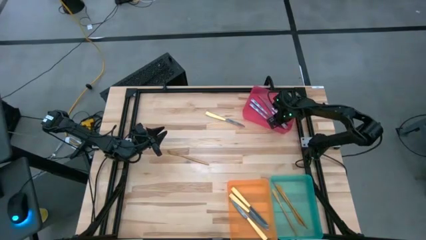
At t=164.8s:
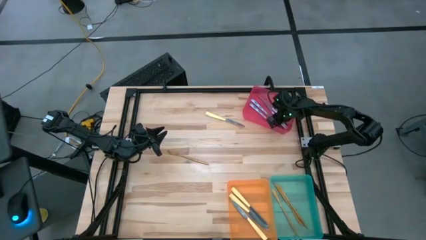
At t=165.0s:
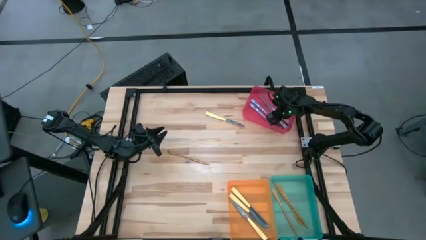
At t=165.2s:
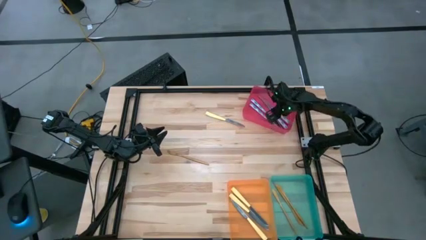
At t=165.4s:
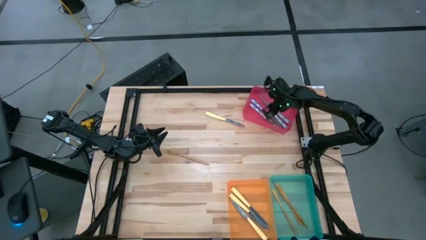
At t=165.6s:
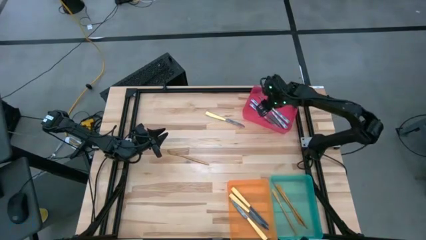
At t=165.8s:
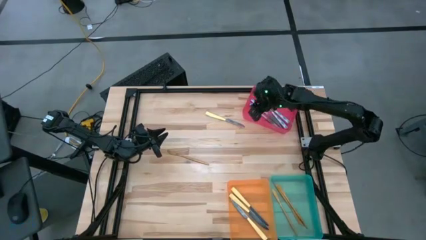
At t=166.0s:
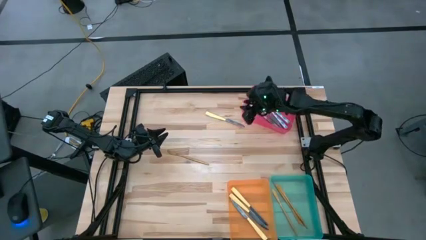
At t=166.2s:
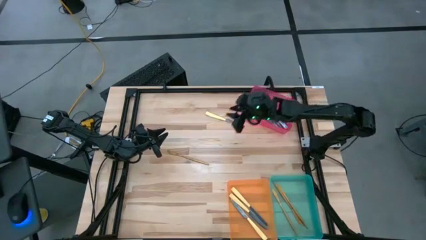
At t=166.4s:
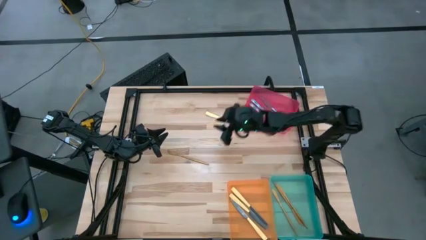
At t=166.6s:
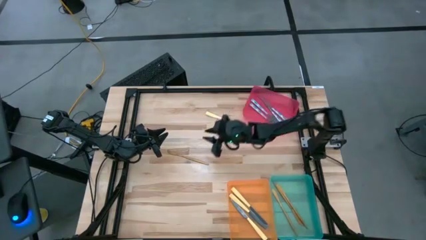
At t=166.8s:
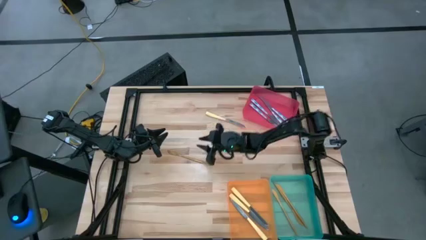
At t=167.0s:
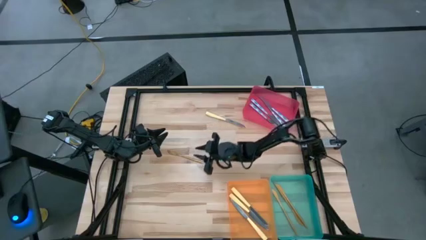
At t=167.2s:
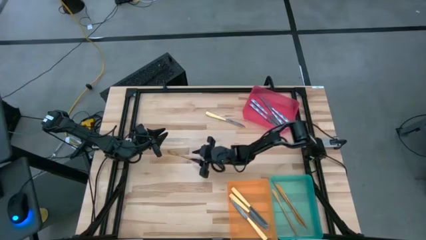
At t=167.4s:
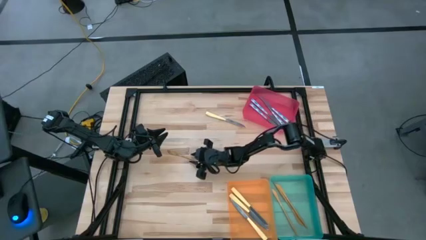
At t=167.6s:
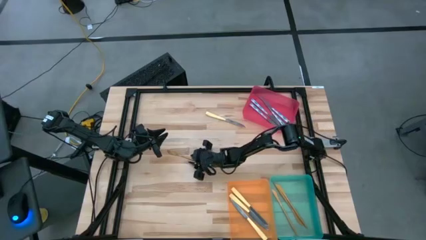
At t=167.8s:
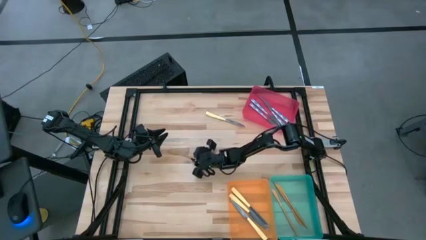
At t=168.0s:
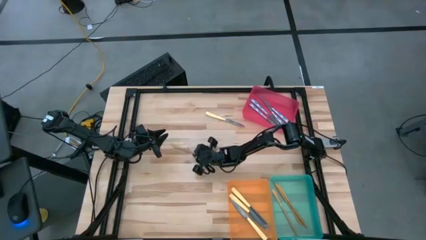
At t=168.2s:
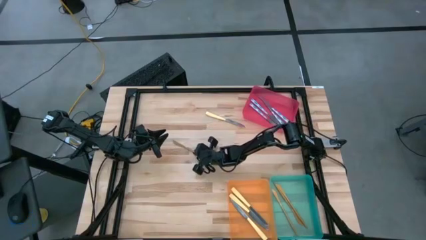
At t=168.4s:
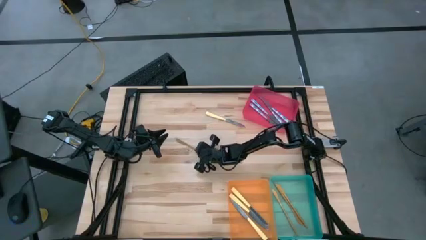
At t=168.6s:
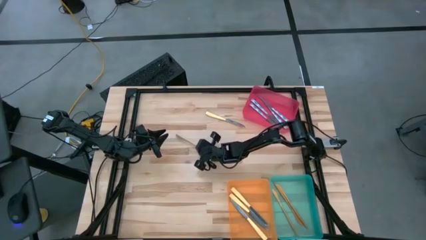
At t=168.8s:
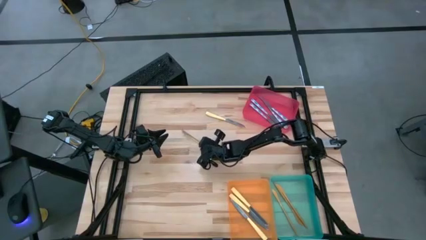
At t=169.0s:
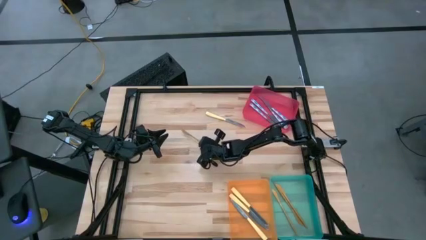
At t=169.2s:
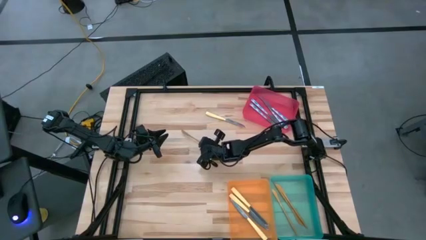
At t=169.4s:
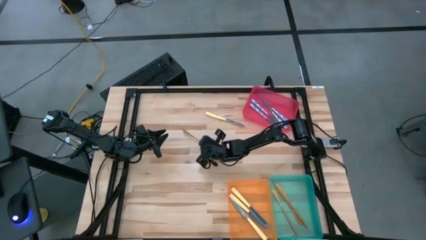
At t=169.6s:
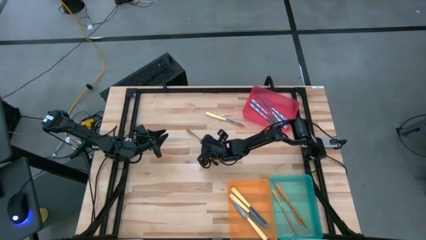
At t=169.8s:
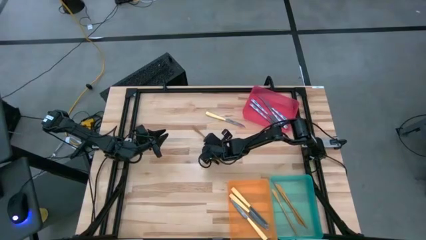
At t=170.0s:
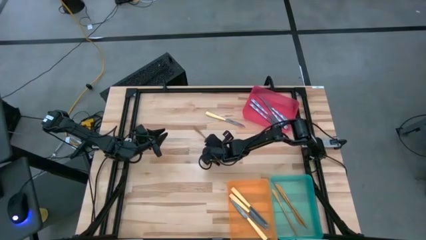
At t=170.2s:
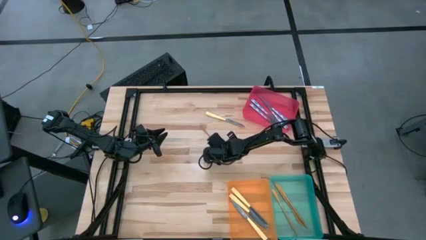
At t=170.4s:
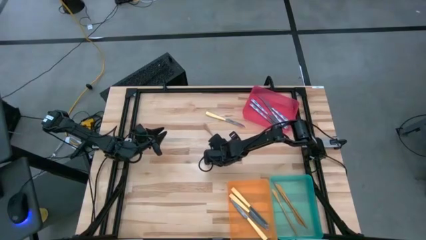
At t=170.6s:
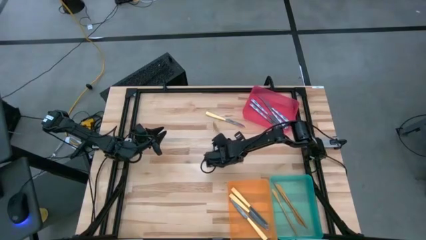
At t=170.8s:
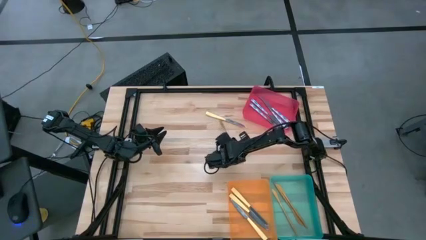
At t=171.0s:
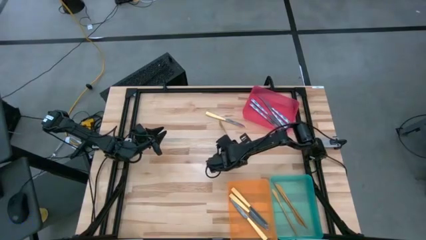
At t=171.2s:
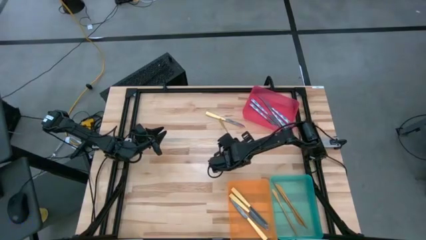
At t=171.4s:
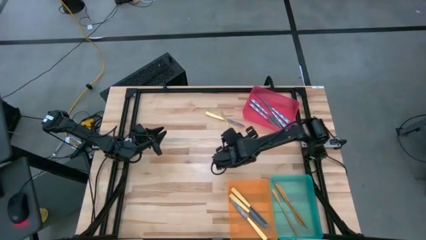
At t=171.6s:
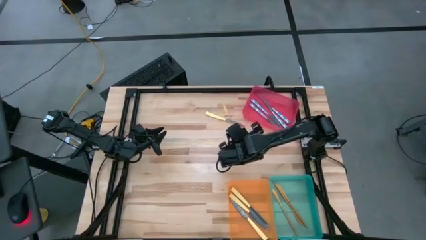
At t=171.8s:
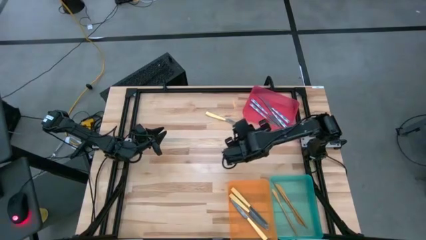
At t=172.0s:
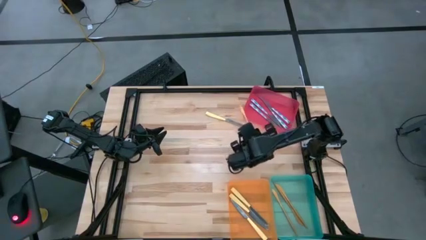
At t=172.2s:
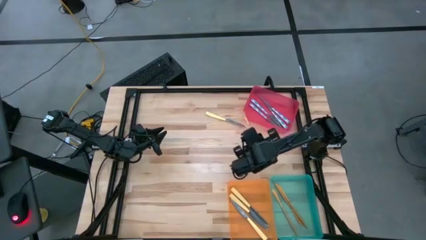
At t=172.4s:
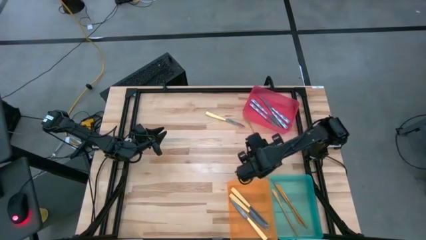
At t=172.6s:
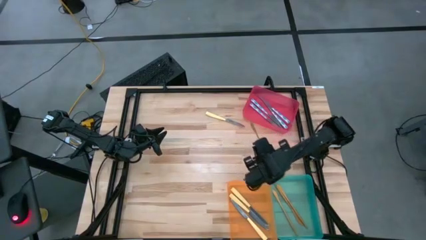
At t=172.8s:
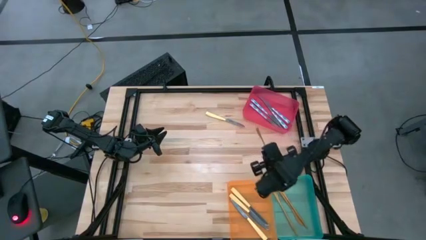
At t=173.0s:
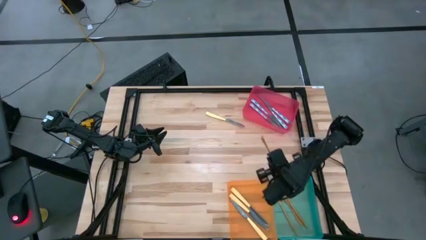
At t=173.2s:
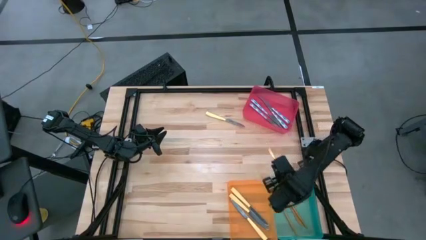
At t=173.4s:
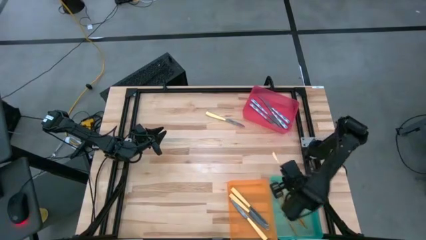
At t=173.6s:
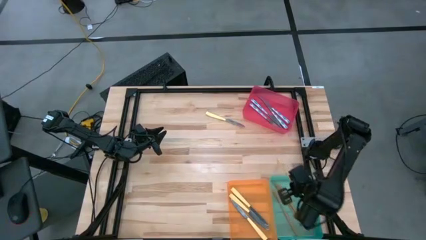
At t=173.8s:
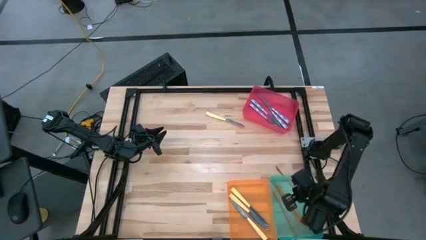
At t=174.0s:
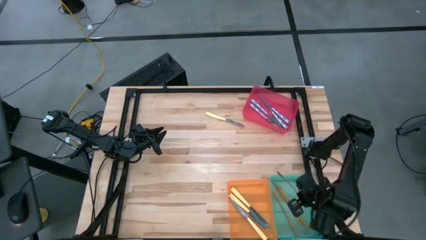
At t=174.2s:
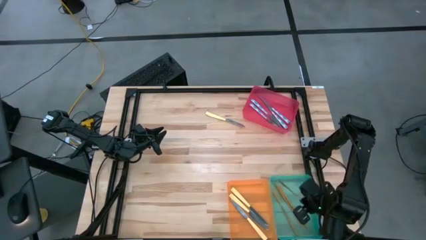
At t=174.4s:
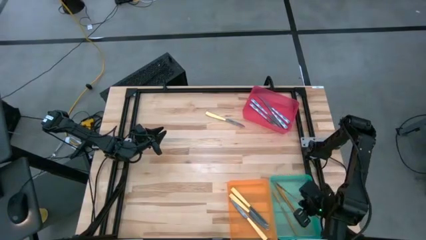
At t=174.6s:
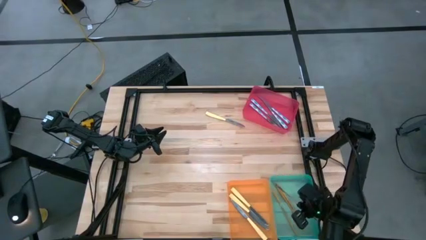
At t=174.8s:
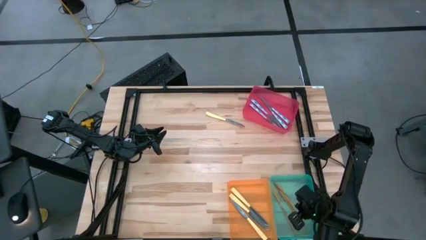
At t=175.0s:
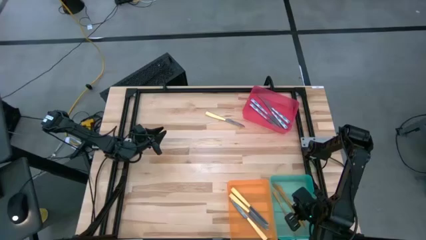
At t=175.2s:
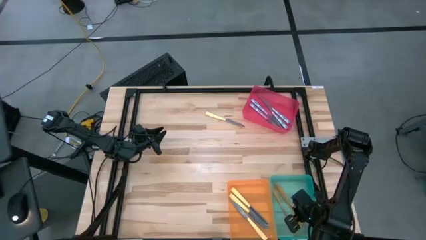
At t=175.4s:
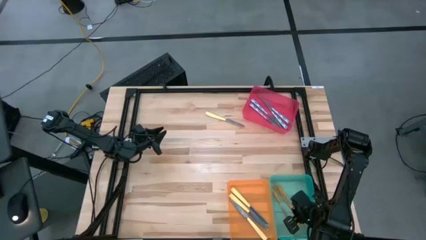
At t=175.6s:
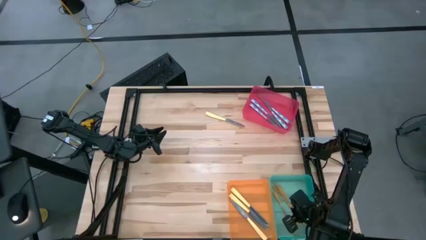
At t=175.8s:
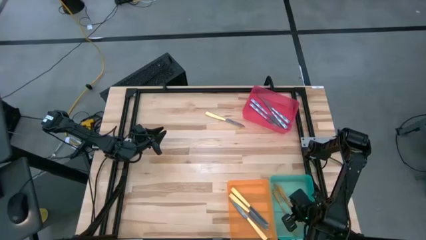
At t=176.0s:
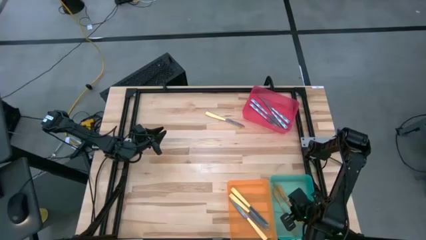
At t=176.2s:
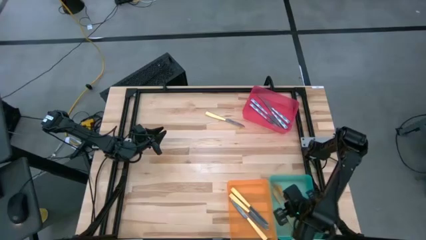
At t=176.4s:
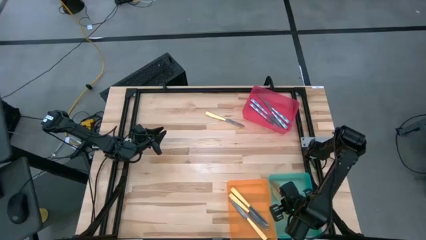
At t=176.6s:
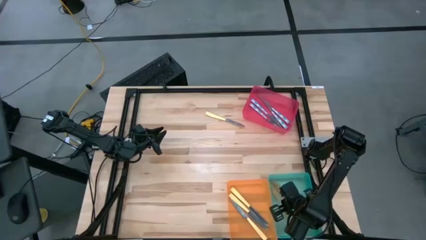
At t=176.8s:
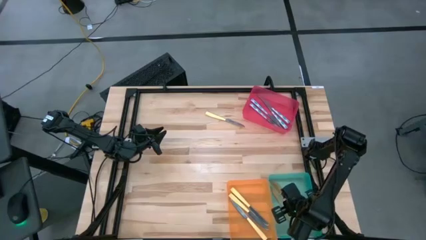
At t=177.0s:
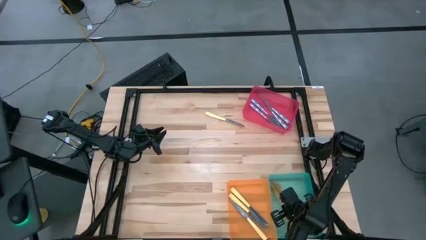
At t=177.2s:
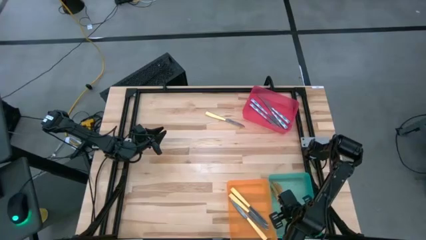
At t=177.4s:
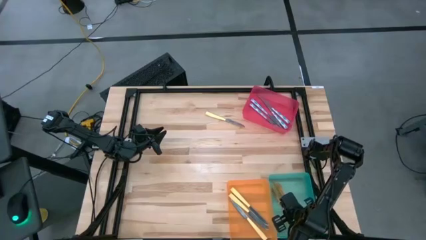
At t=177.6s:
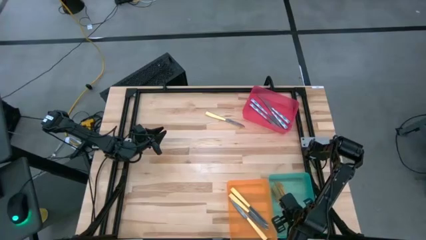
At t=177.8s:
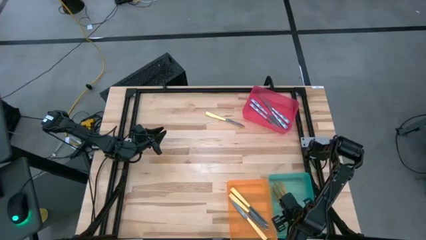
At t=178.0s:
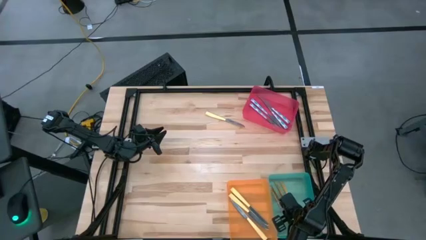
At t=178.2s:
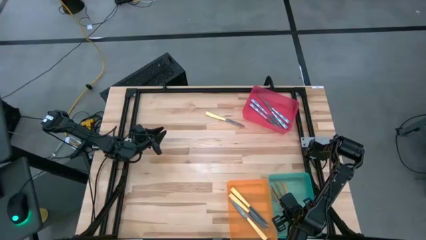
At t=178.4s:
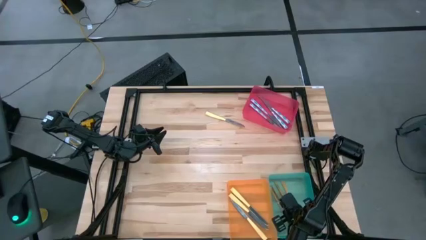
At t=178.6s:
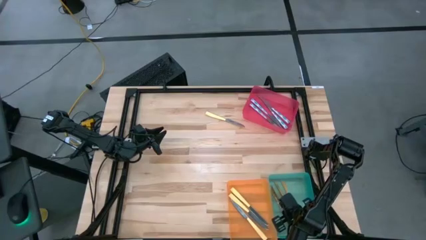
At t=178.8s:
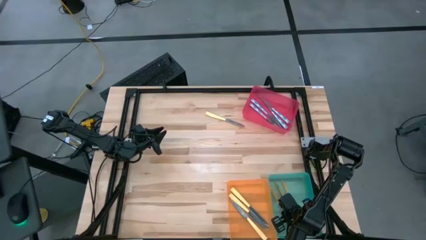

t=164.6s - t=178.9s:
Task: Sort silverware by color (type)
Put the gold knife into the blue bin
